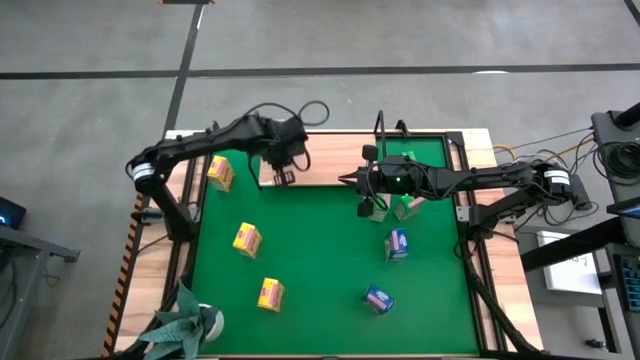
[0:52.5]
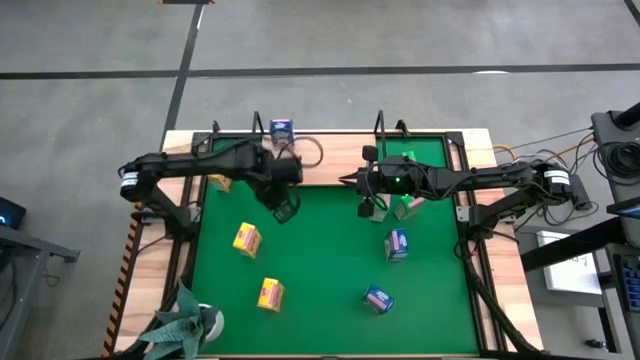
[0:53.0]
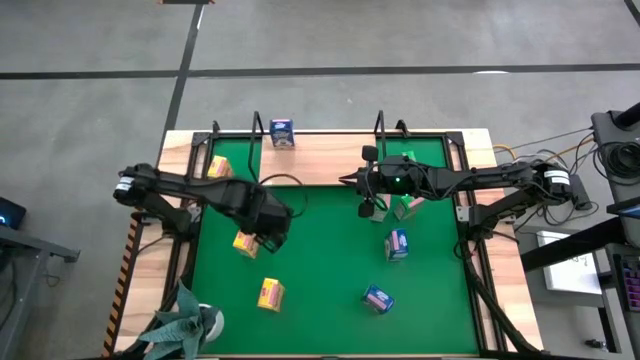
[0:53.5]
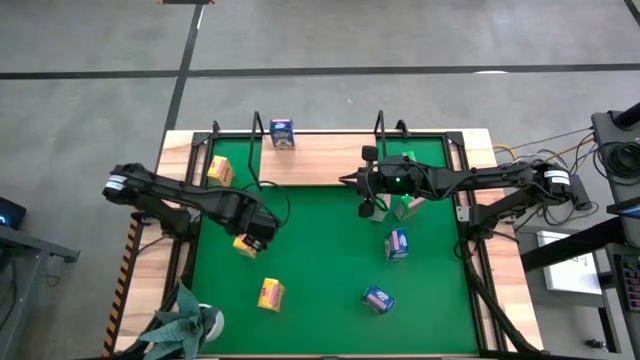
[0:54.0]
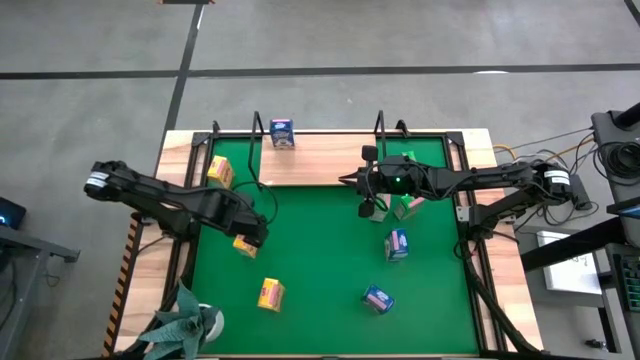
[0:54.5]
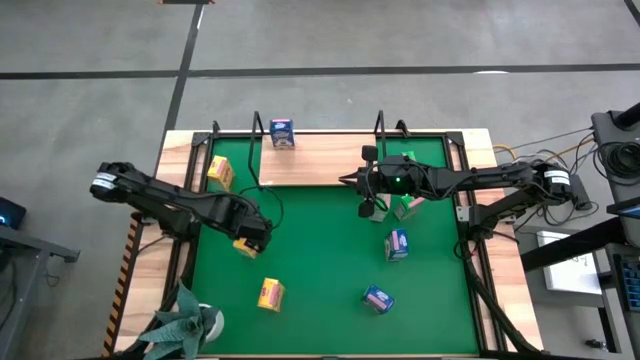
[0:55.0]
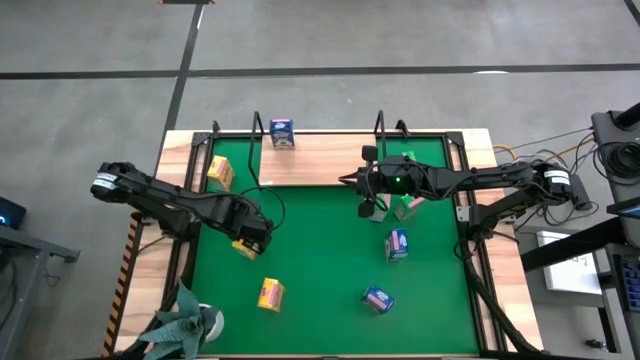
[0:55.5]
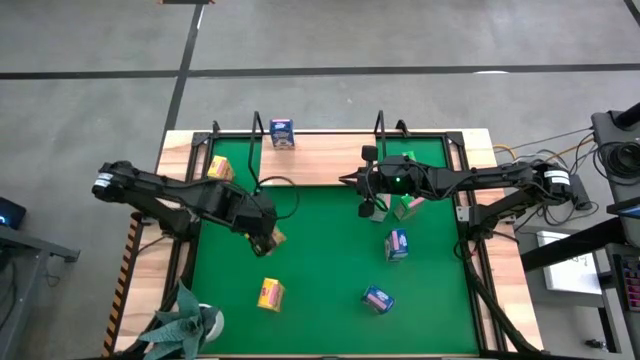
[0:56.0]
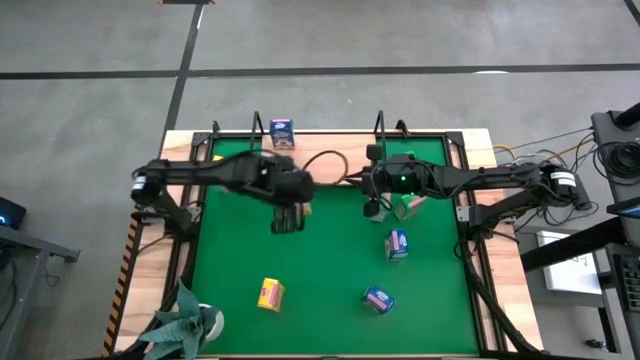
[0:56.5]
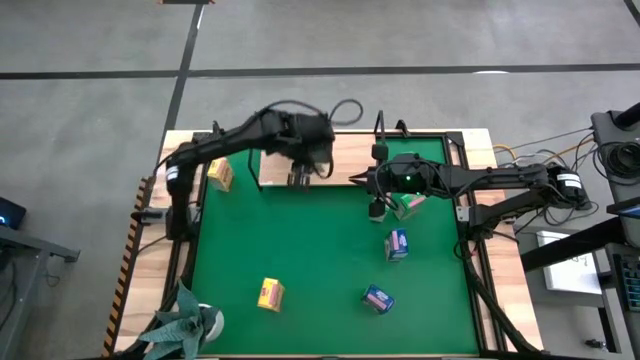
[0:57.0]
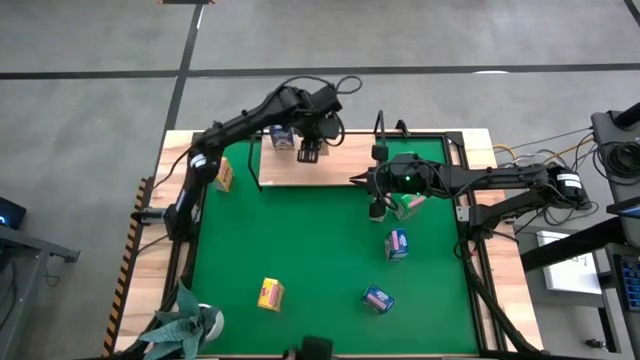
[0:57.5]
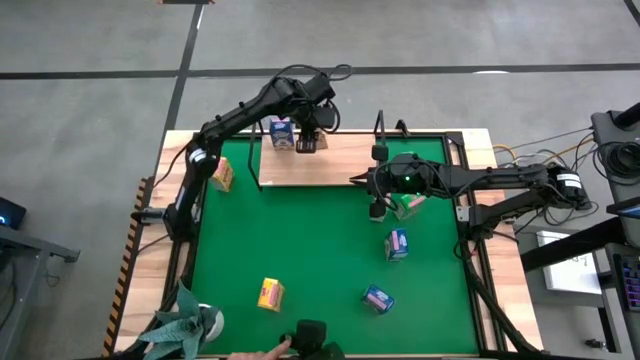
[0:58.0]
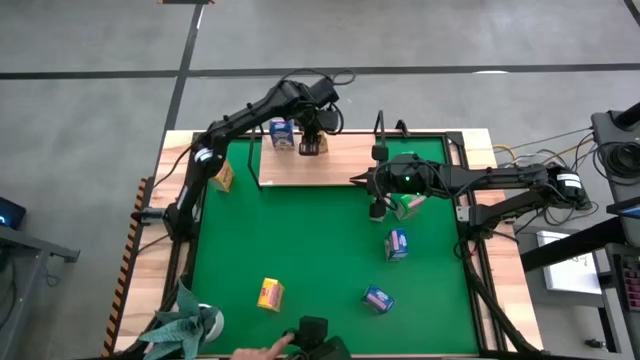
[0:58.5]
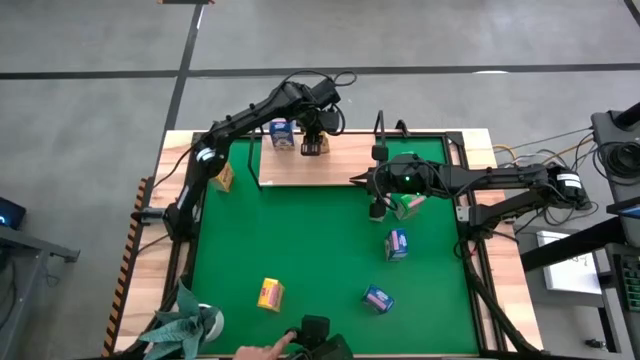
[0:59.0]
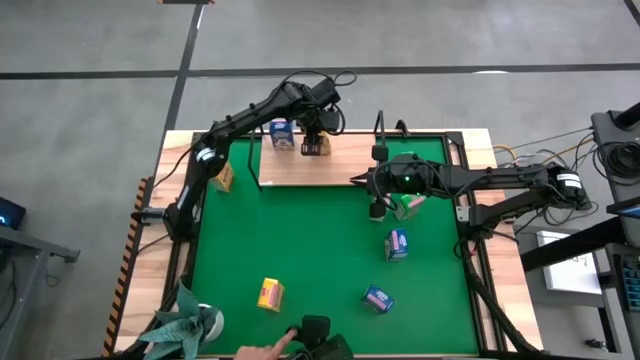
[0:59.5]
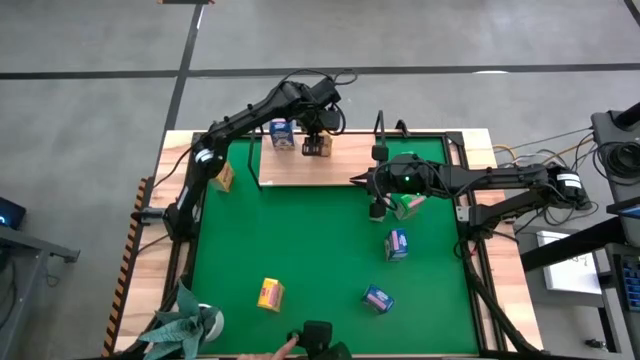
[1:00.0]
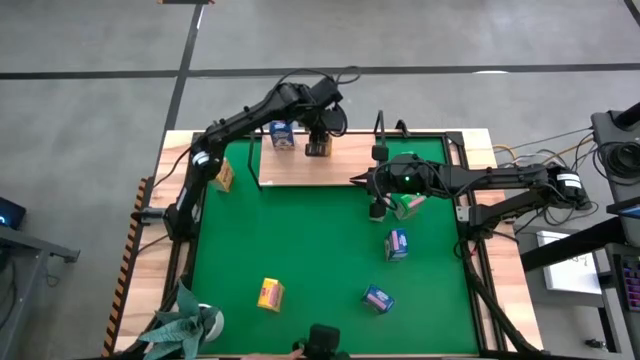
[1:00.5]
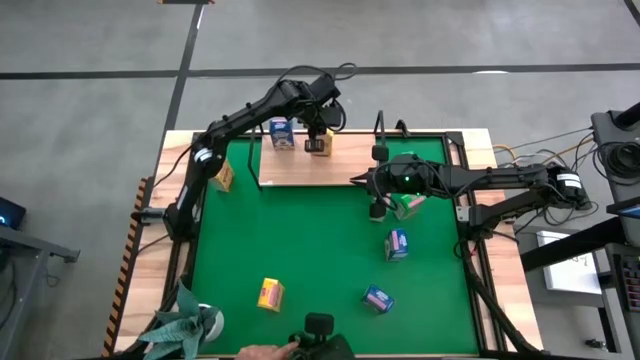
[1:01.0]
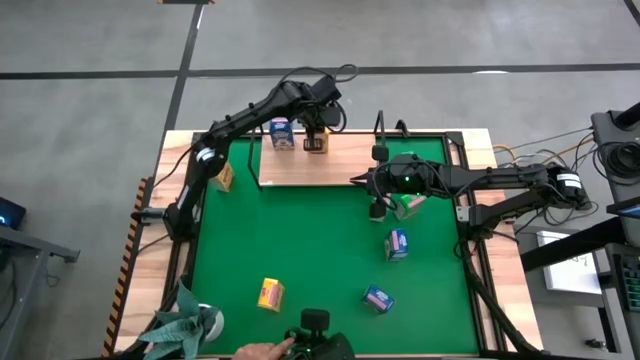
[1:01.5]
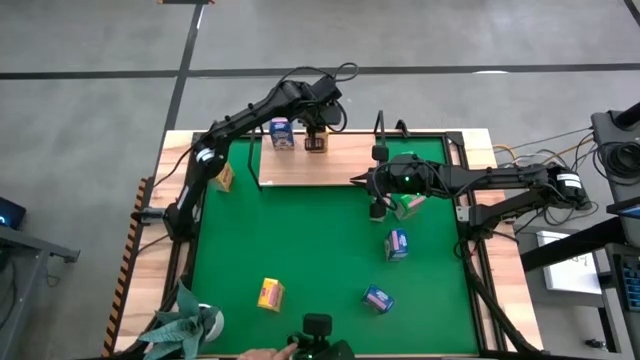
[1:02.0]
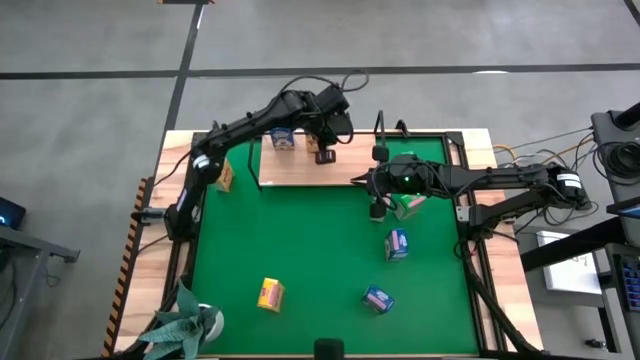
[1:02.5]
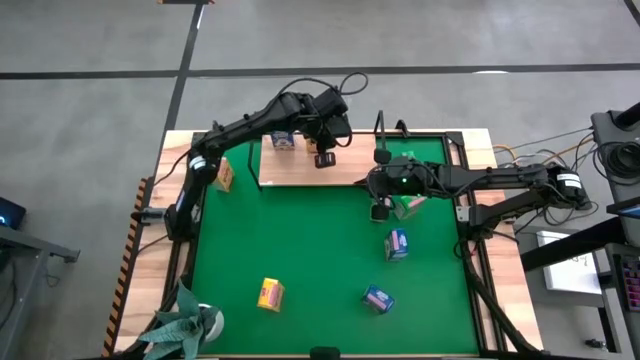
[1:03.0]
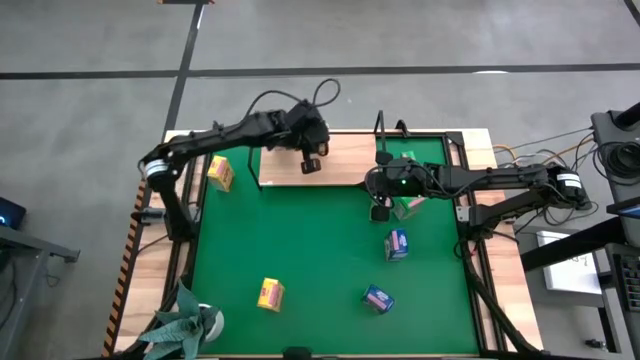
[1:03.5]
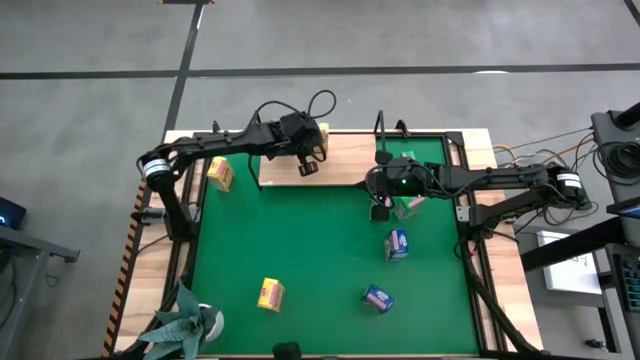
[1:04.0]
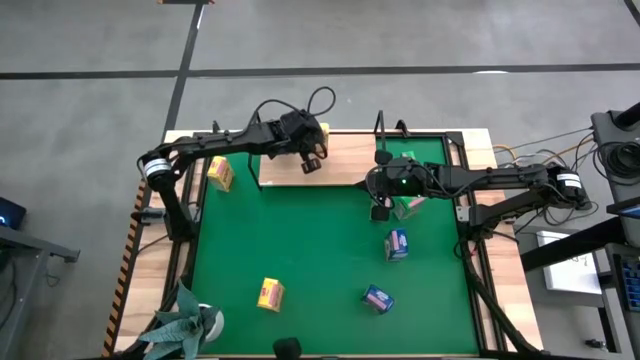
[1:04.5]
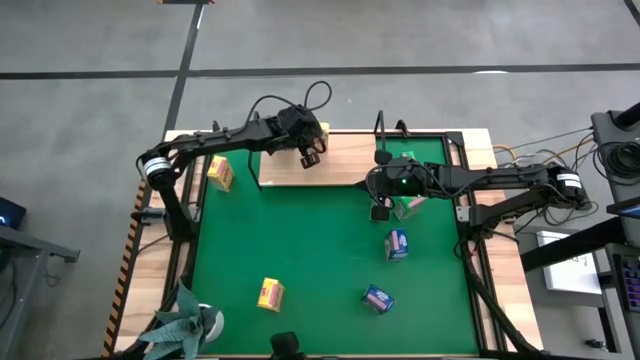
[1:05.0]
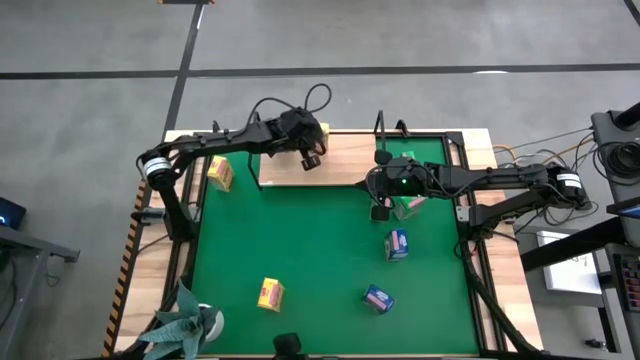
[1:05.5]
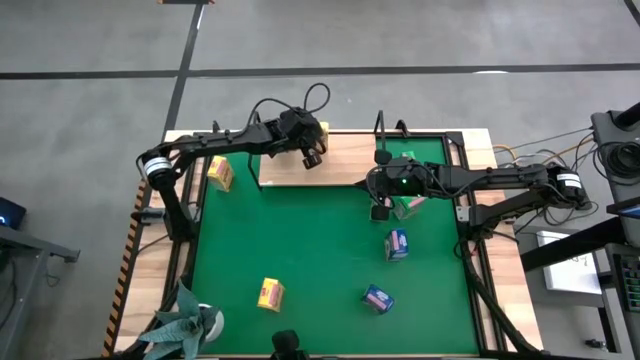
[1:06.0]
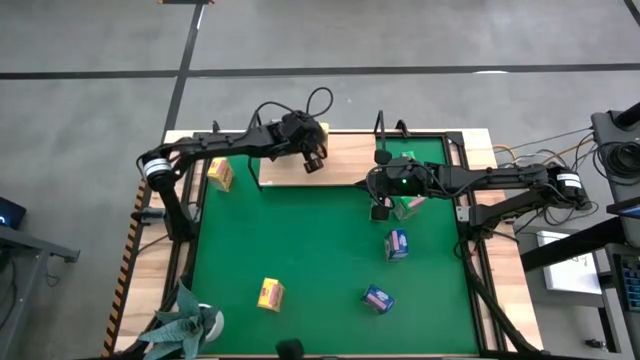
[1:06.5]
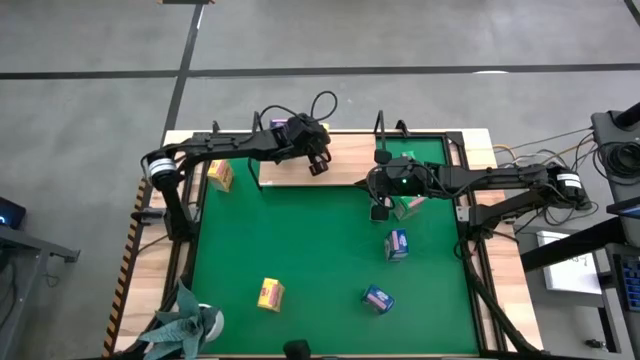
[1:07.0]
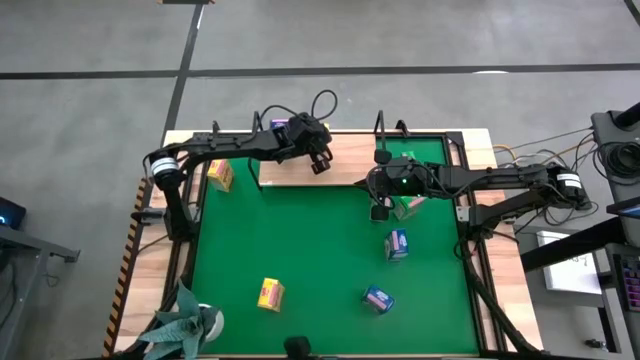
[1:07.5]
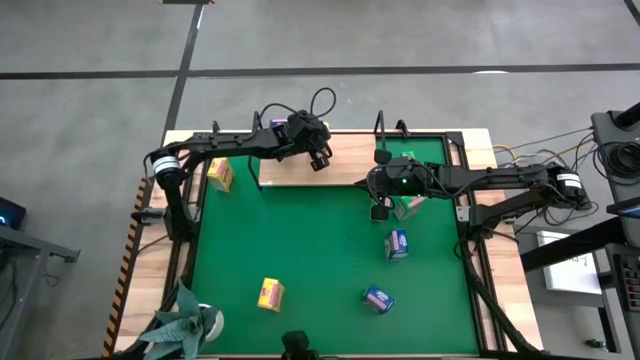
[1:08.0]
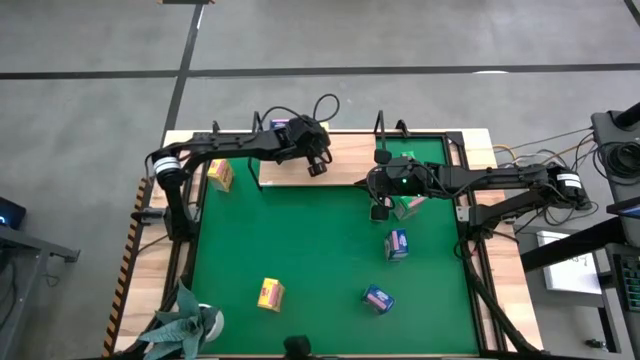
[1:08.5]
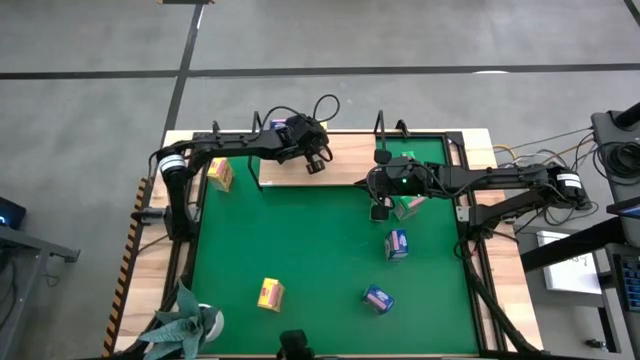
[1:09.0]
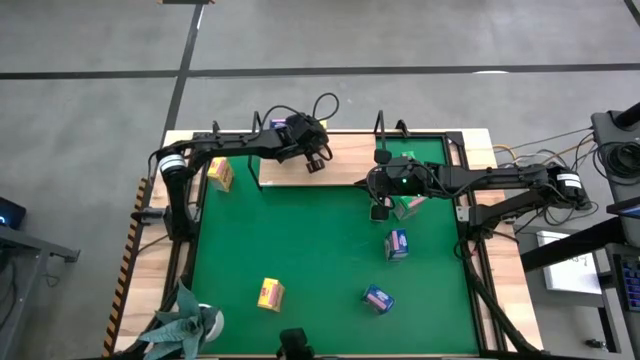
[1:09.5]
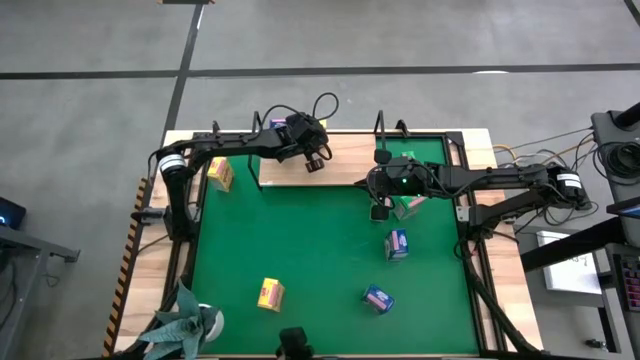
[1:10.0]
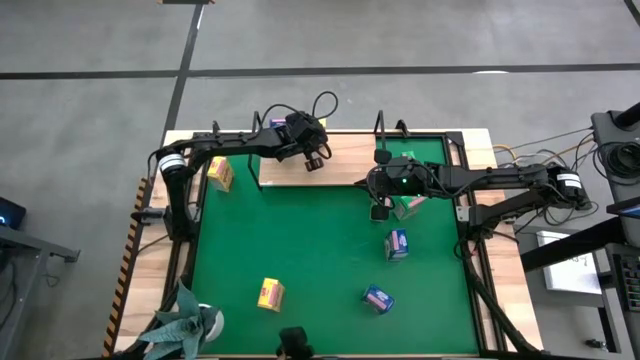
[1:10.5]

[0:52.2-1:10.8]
Task: Stack cereal on shelf
Put the middle yellow cereal box on the shelf

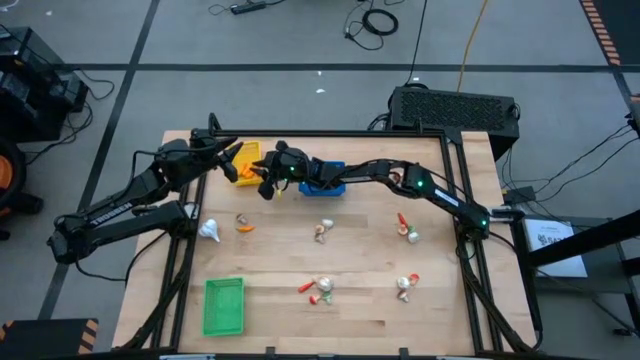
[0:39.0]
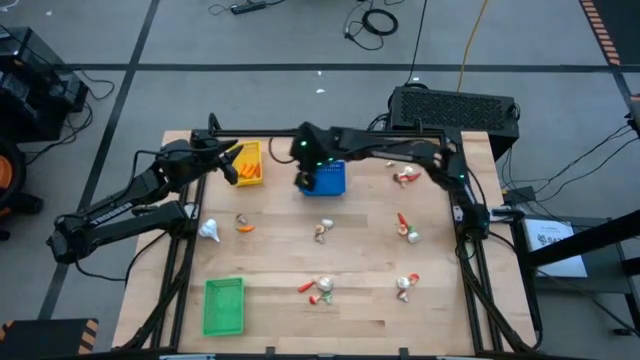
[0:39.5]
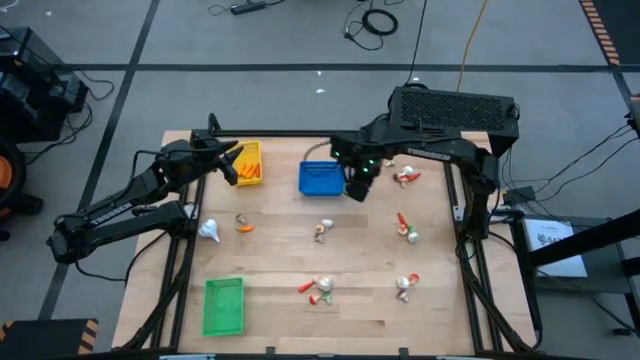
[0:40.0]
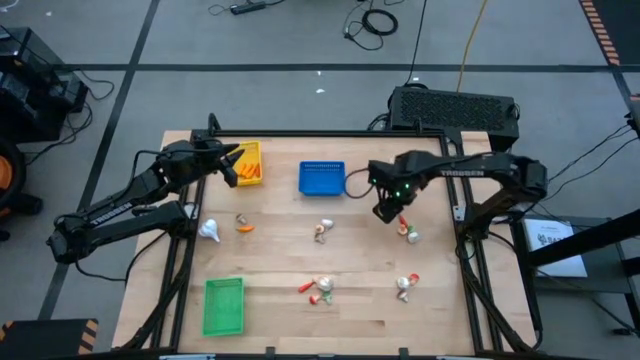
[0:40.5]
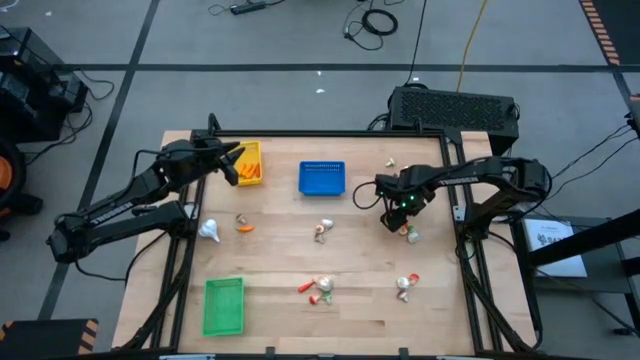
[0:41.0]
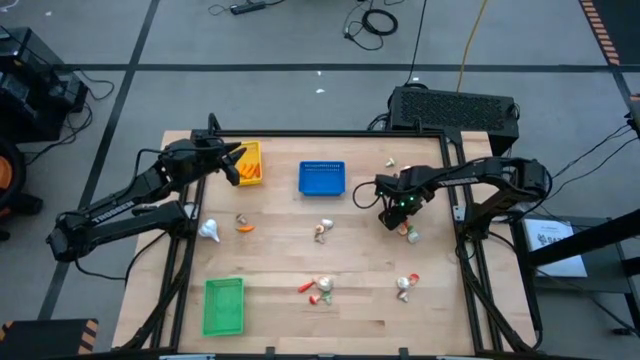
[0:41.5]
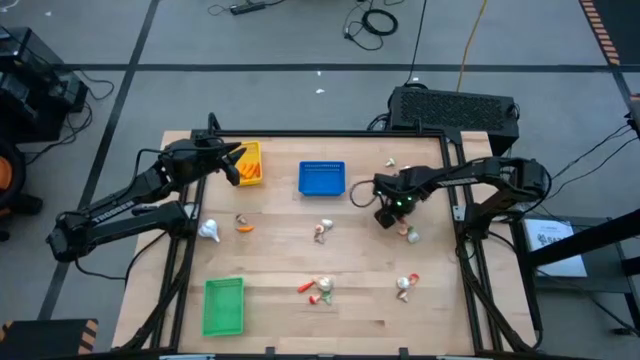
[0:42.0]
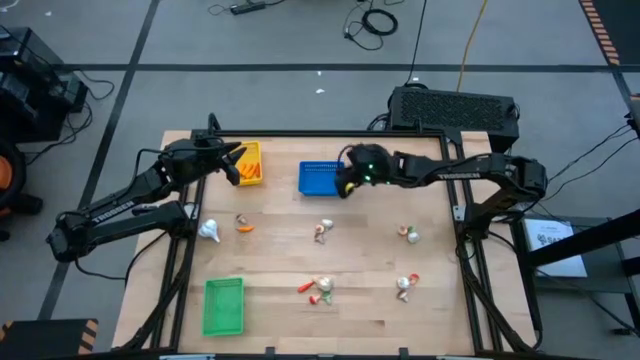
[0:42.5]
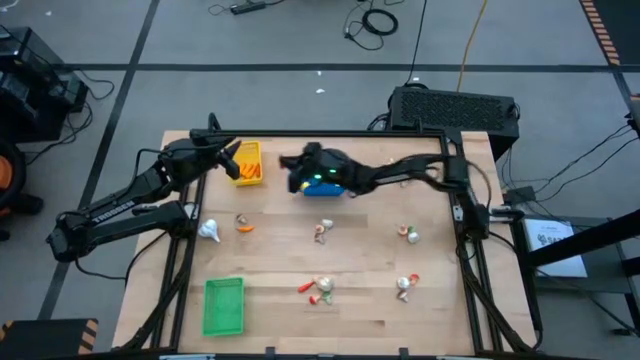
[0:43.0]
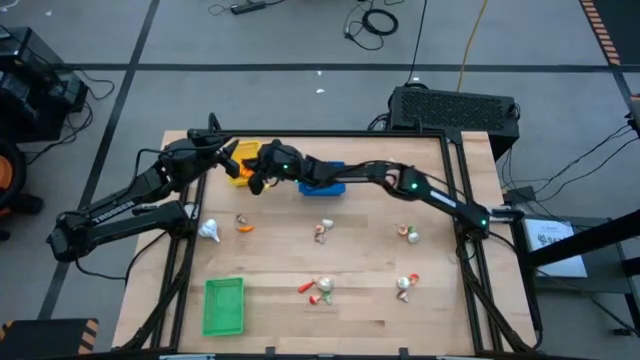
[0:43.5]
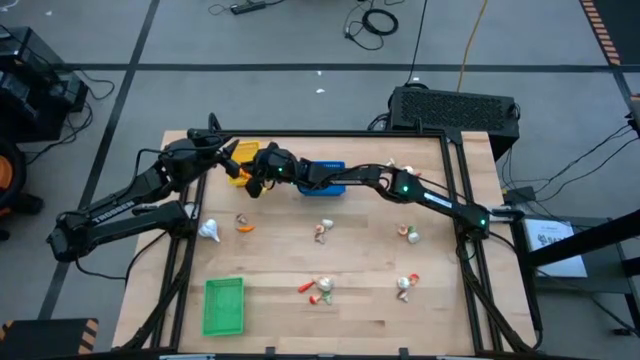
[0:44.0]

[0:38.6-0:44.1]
Task: Sort produce into baskets
Put the orange chili pepper into the yellow bin
